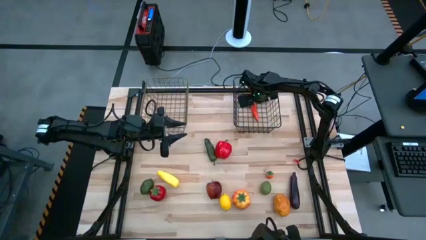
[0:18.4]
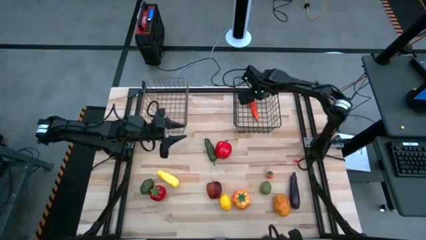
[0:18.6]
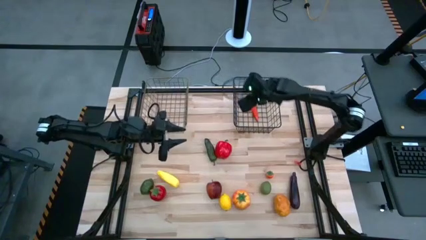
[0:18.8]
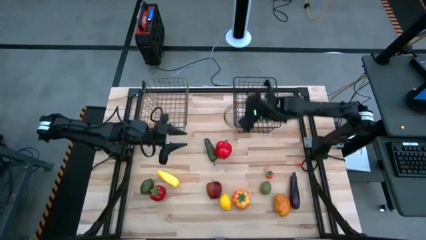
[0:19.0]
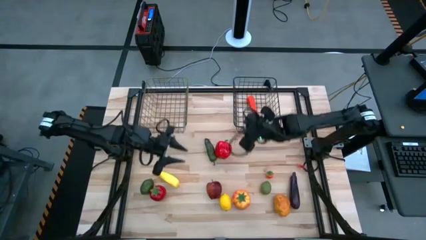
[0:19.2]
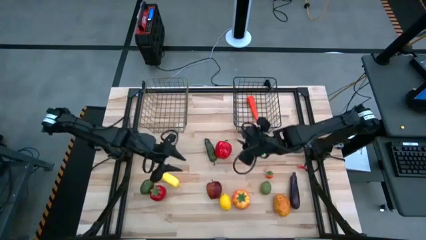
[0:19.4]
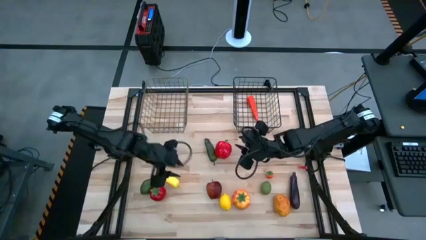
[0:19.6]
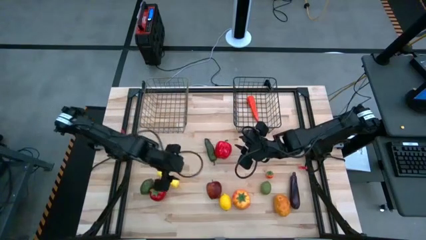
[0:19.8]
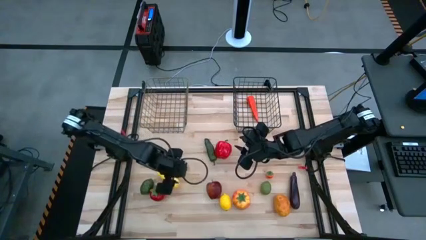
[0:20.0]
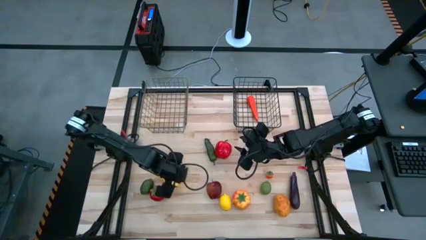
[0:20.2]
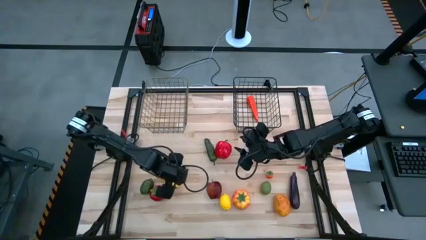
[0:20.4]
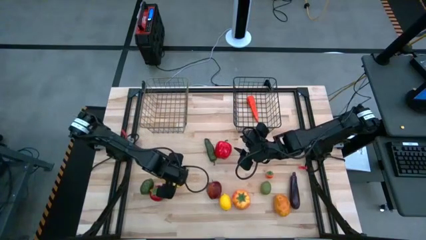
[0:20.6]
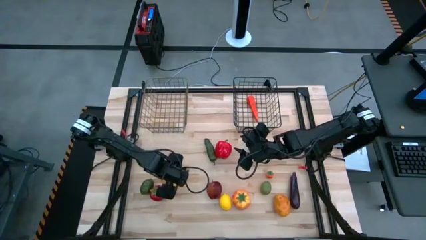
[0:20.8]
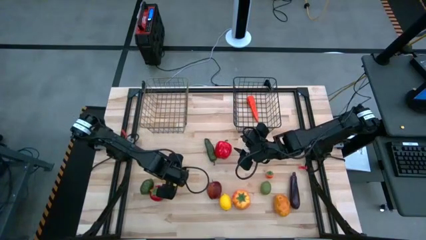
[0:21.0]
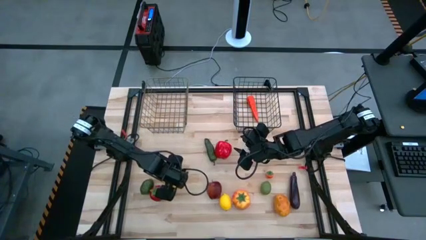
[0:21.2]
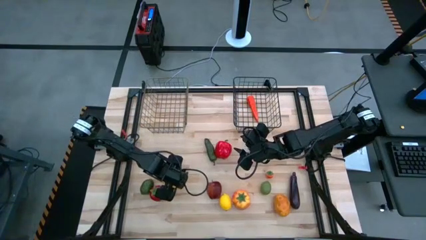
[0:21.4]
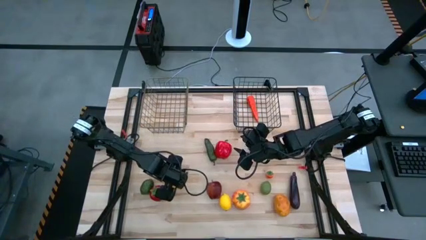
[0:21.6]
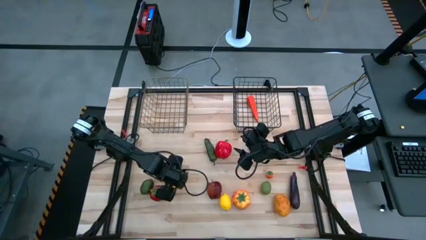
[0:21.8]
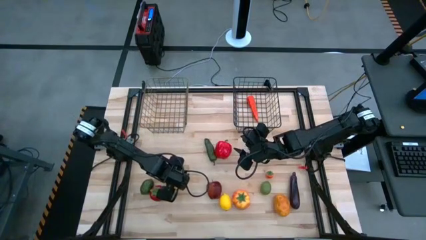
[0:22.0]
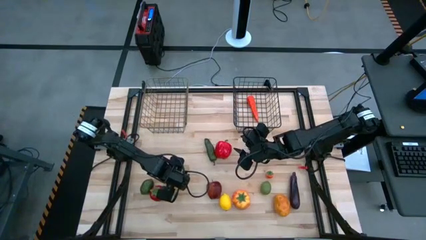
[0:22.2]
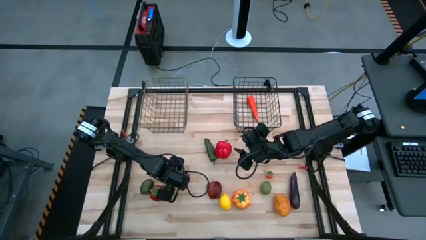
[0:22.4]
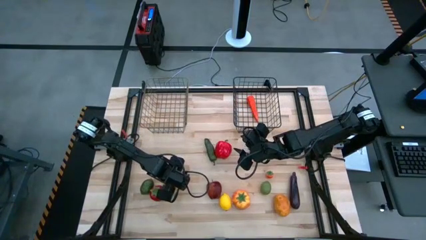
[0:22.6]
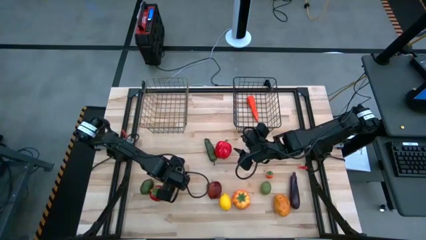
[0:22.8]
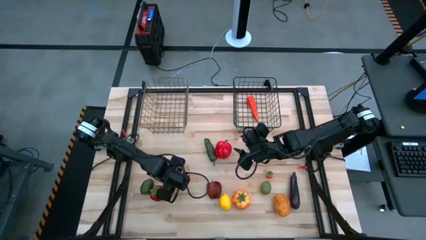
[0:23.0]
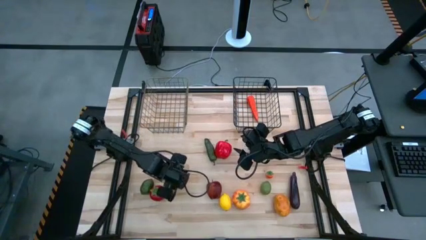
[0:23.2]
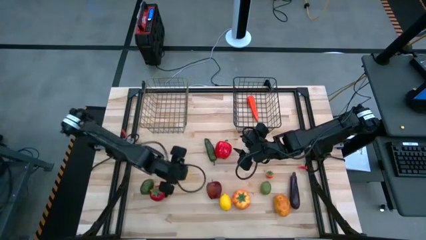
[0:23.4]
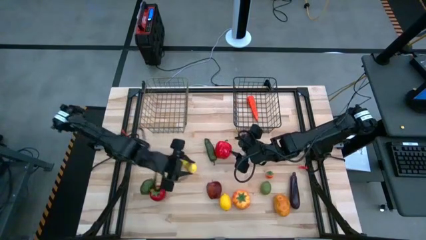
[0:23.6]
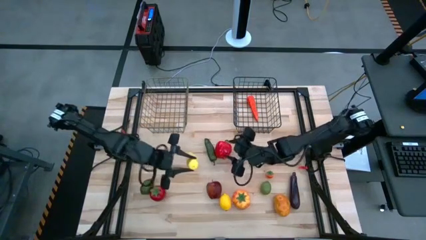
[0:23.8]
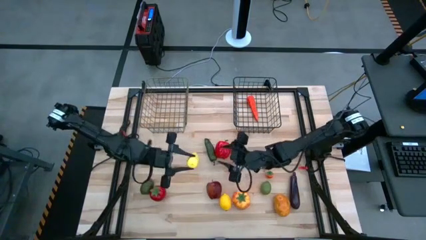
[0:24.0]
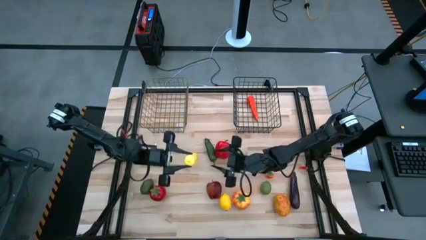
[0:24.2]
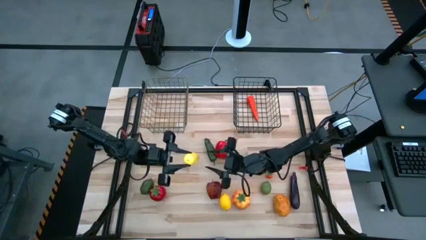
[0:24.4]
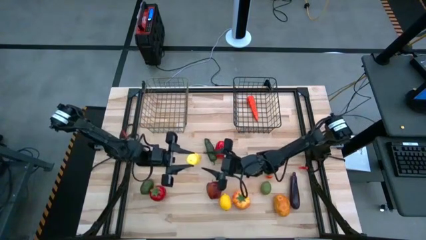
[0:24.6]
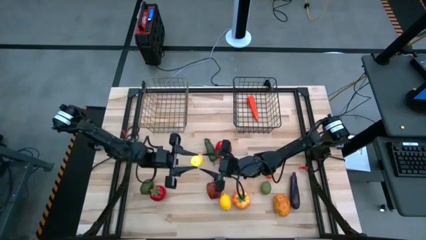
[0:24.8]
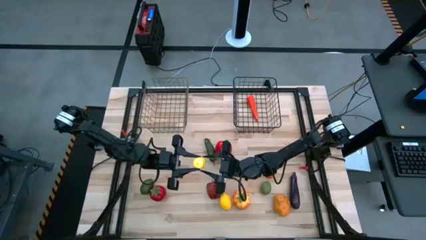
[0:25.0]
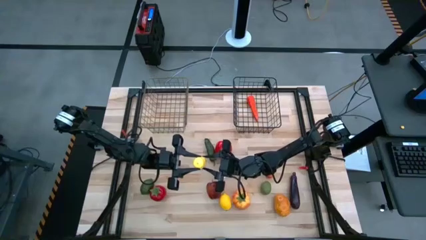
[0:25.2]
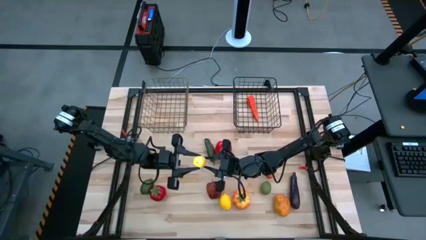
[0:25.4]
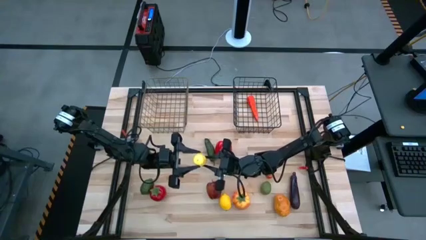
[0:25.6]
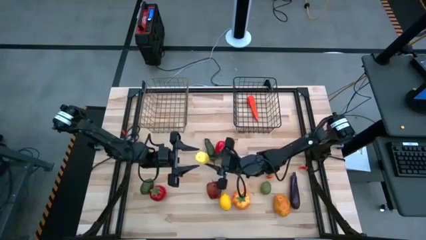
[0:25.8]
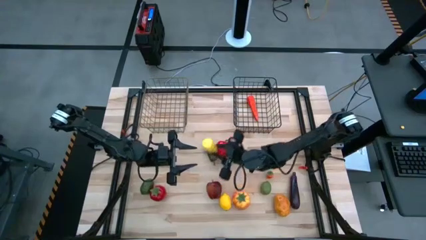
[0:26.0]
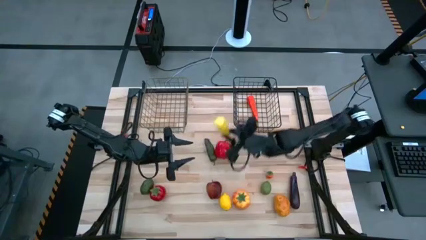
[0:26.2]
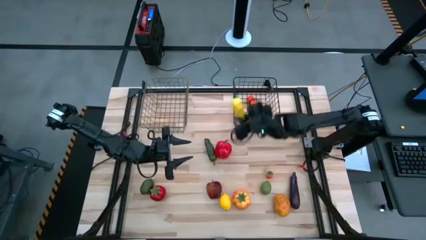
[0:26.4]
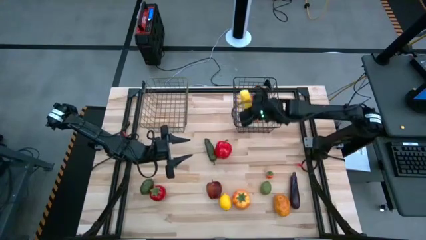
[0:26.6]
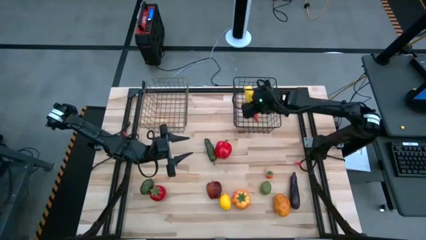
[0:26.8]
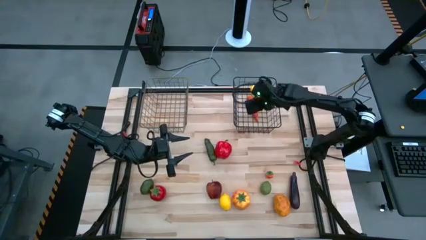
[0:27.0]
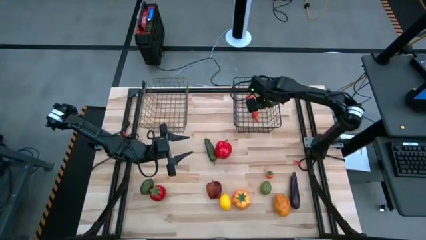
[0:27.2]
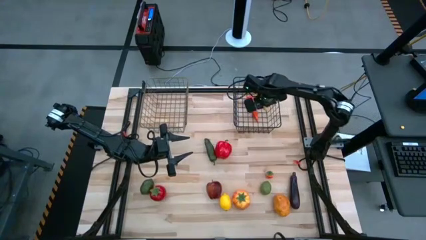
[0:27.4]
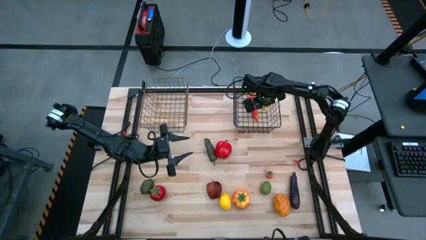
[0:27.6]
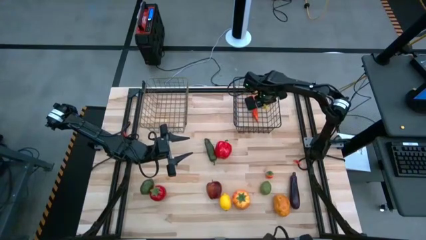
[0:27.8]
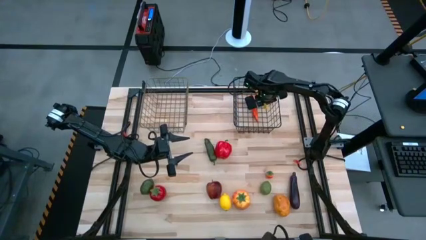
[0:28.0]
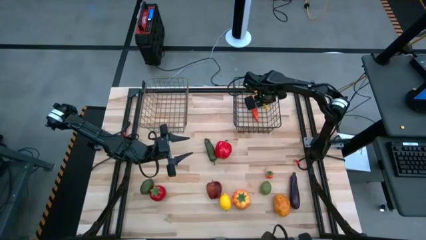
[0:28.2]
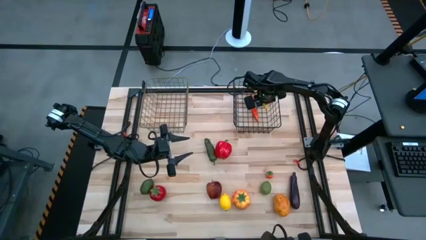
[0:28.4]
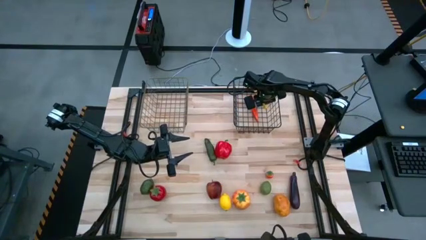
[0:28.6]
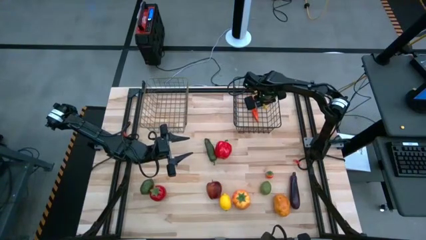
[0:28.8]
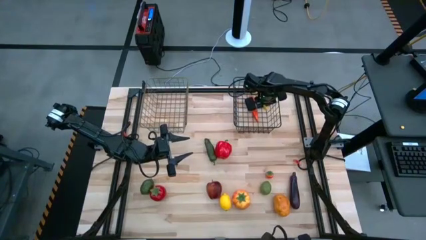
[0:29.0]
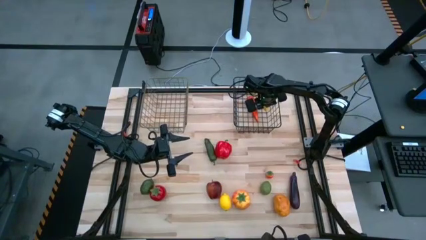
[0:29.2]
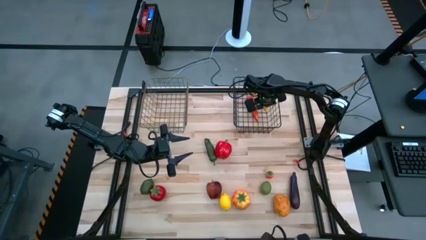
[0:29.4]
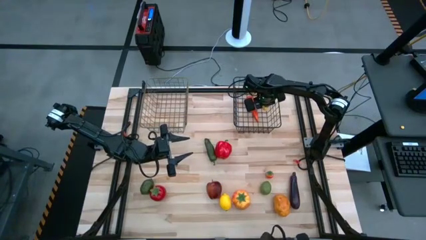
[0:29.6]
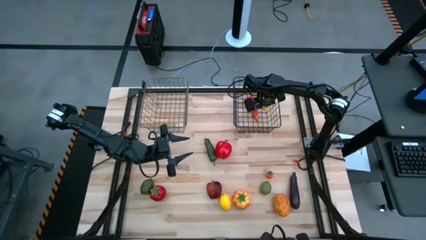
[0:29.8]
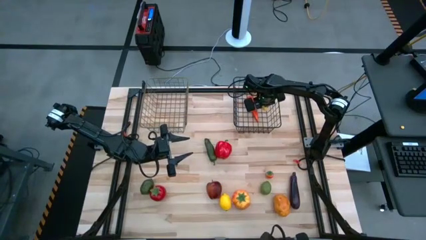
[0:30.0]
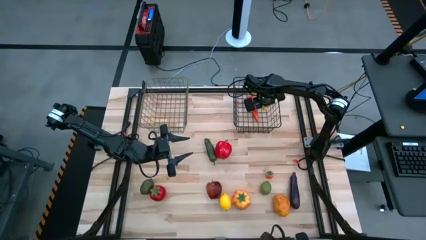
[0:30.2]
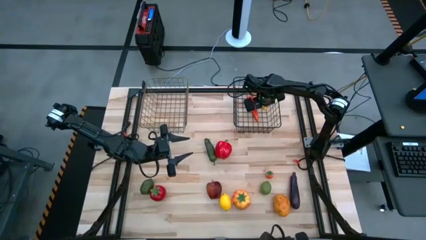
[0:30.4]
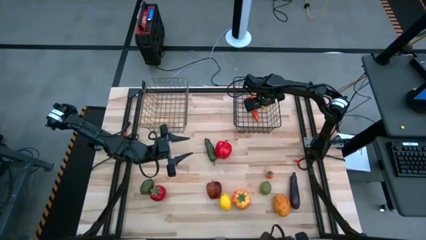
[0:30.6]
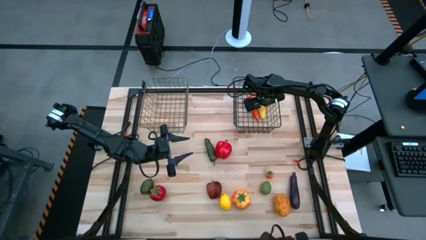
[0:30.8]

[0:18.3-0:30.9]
Task: Sort produce into baskets
Put the yellow corn into the right black wire basket

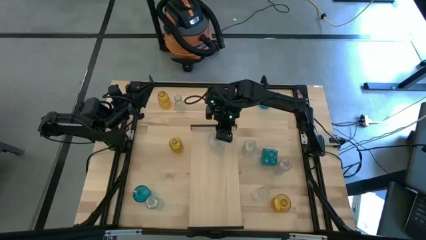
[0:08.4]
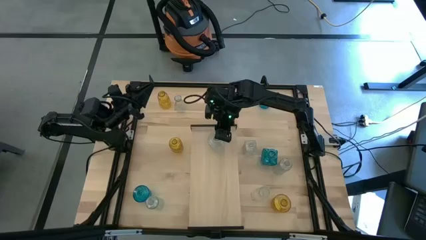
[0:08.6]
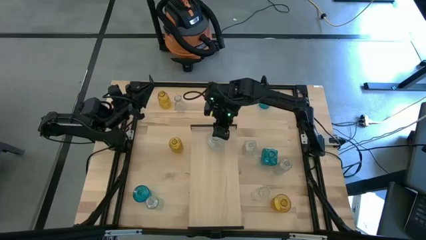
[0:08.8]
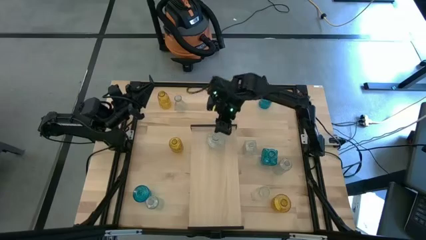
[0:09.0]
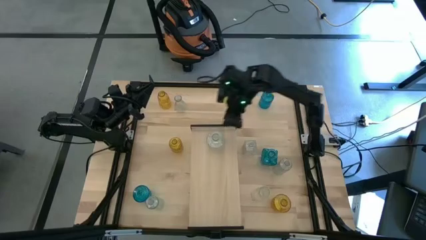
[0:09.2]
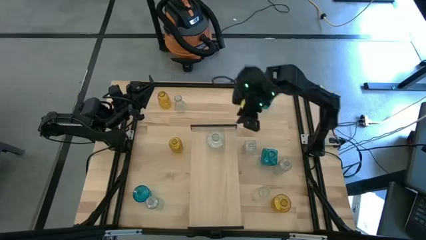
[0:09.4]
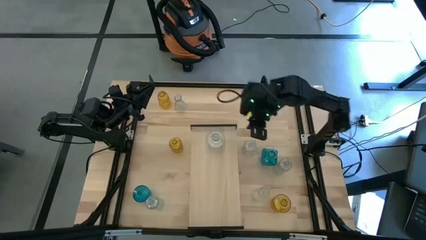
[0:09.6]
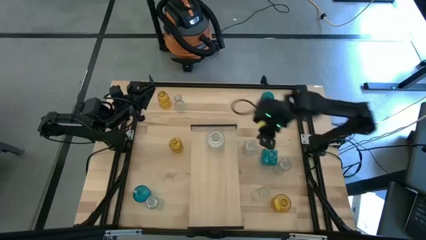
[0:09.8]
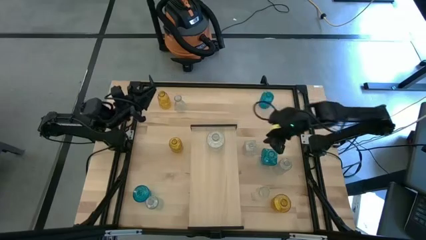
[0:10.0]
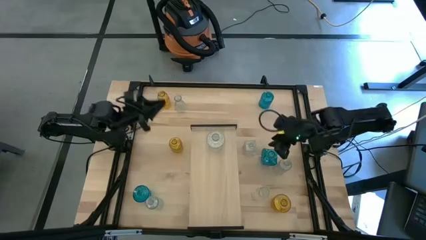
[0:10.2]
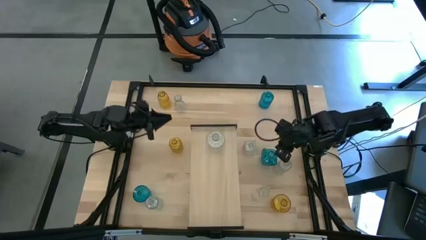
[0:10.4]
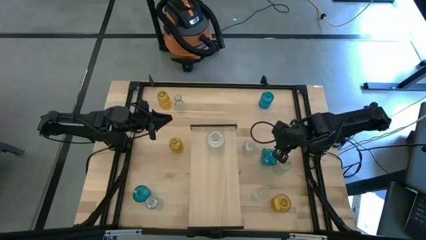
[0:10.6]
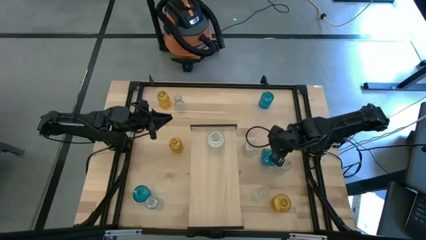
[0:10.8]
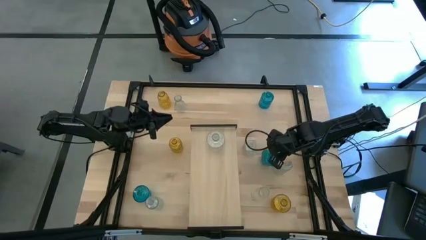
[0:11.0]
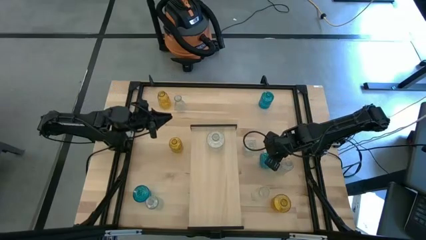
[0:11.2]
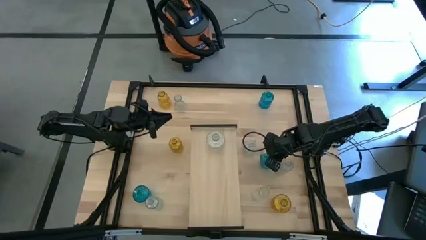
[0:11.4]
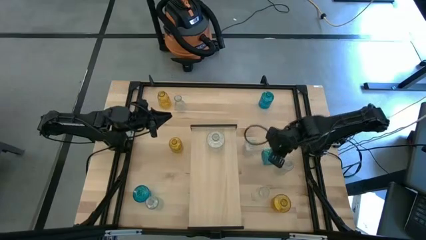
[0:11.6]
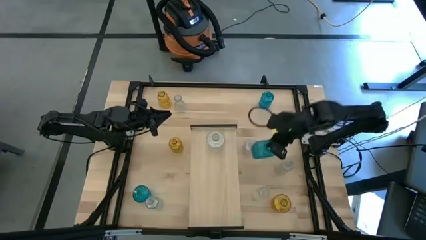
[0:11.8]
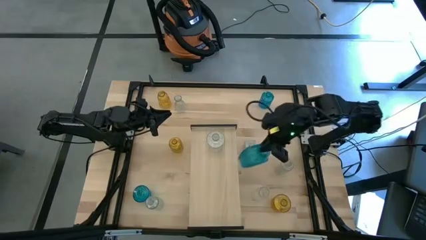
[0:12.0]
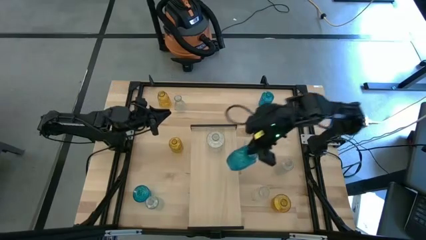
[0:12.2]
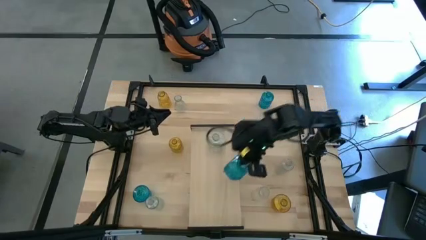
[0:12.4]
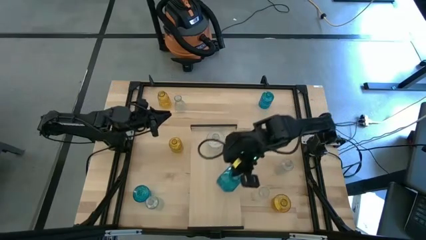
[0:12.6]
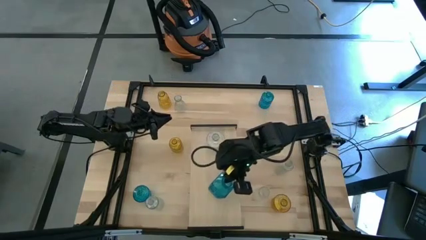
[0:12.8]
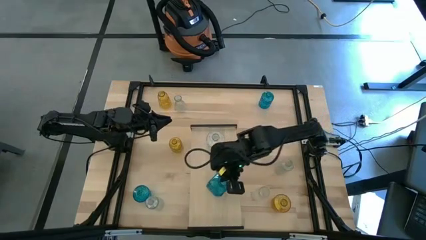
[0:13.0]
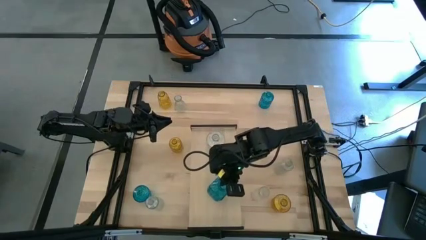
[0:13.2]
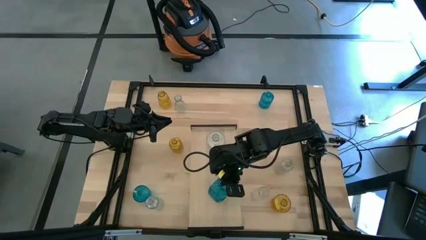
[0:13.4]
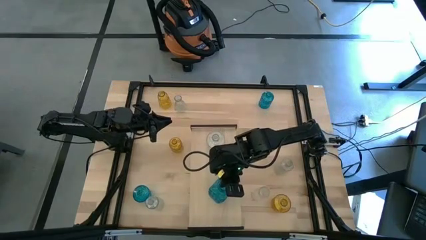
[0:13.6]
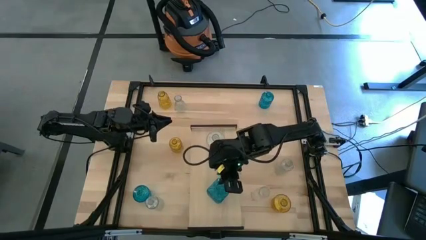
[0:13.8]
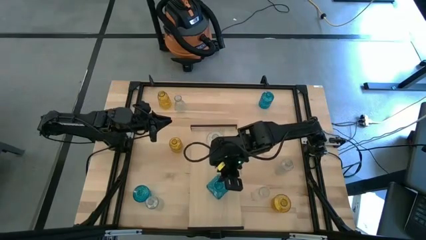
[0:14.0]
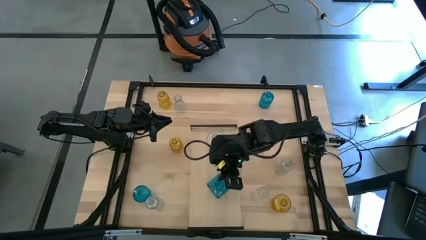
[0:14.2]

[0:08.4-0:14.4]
Task: sort vases onto shelf
Put the blue vase on the shelf
